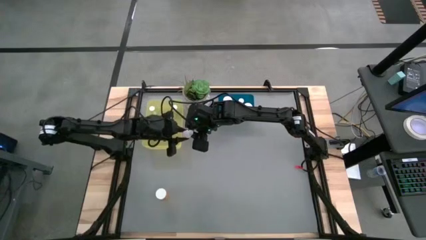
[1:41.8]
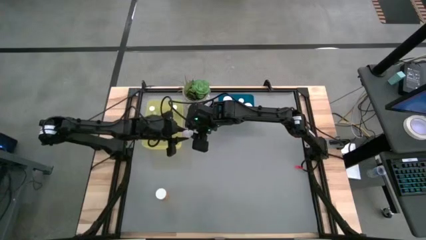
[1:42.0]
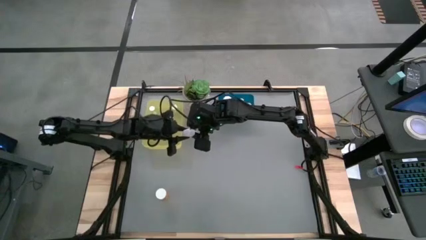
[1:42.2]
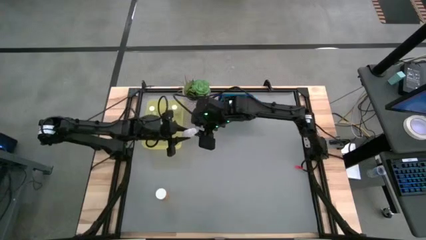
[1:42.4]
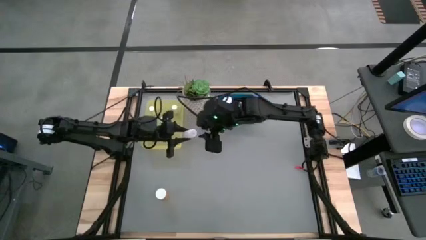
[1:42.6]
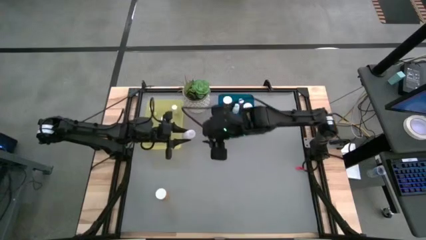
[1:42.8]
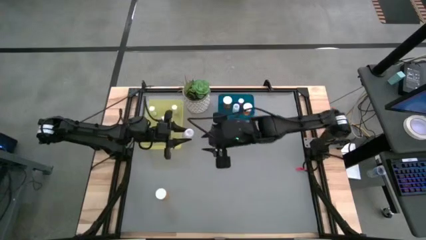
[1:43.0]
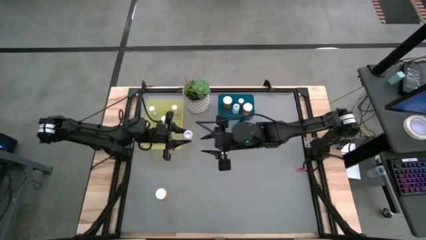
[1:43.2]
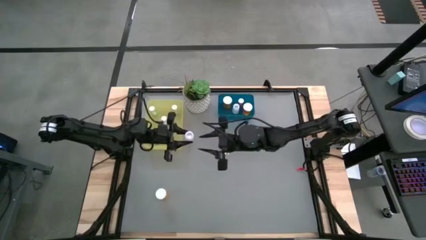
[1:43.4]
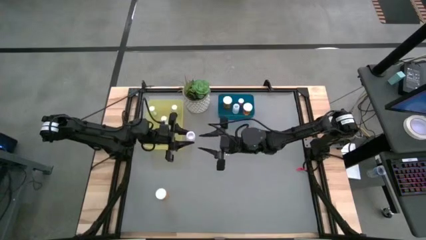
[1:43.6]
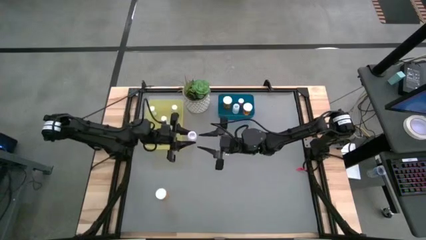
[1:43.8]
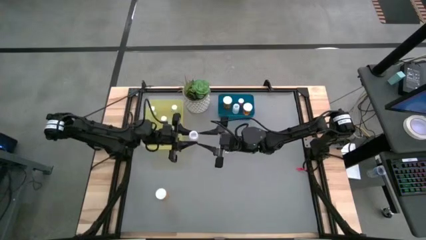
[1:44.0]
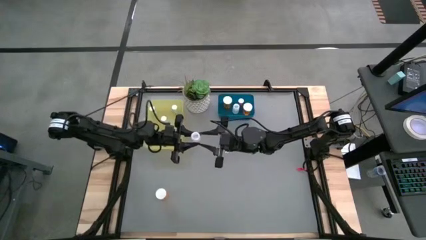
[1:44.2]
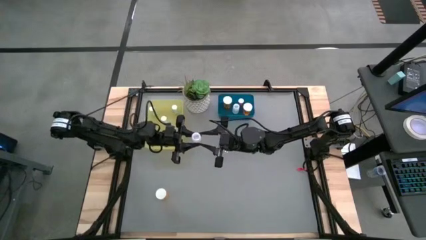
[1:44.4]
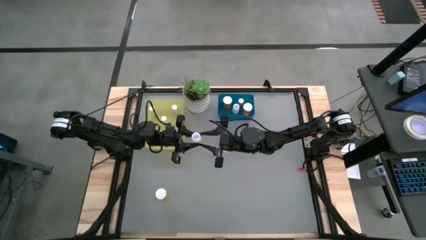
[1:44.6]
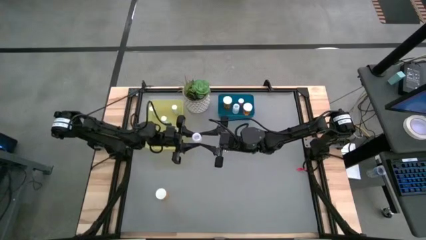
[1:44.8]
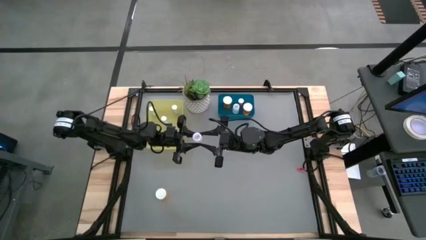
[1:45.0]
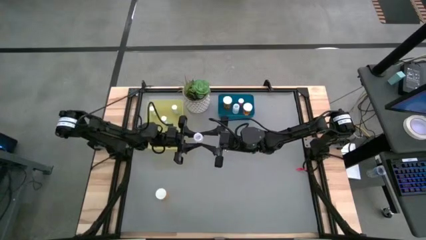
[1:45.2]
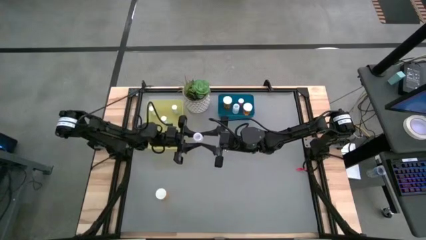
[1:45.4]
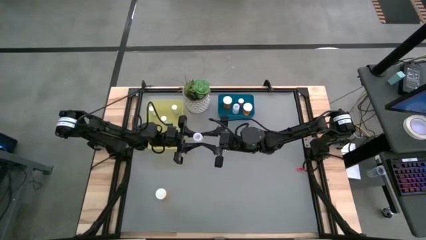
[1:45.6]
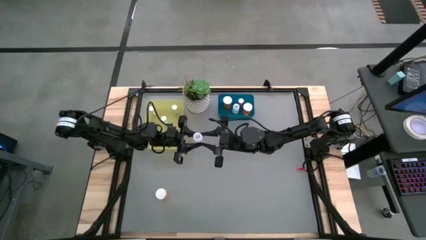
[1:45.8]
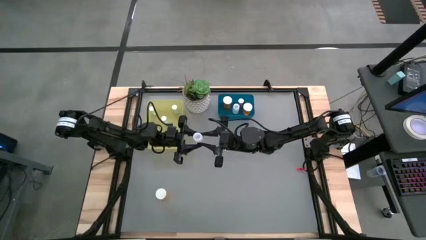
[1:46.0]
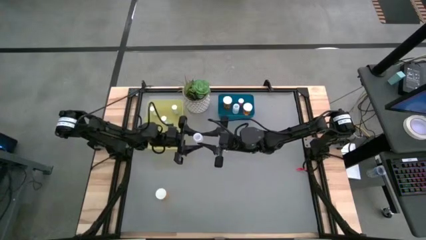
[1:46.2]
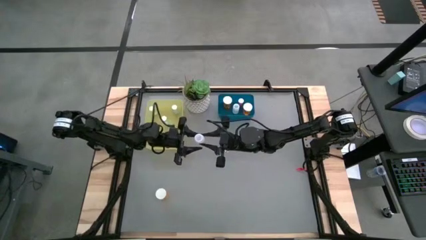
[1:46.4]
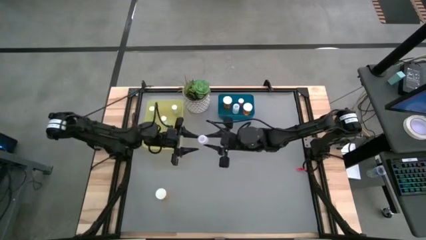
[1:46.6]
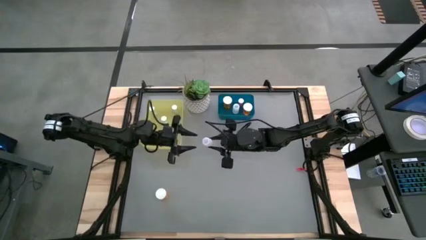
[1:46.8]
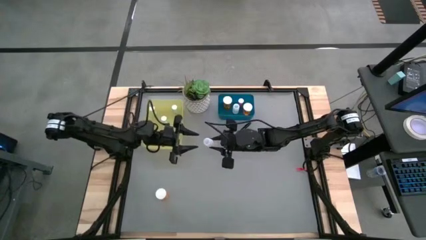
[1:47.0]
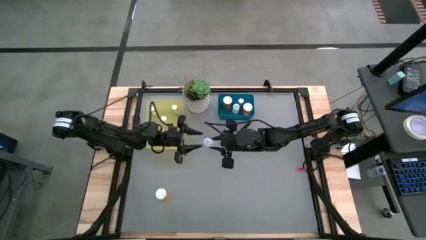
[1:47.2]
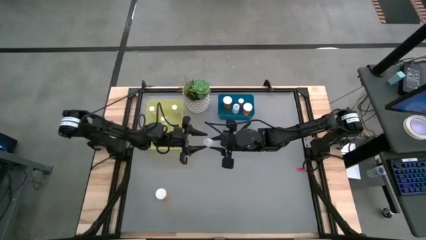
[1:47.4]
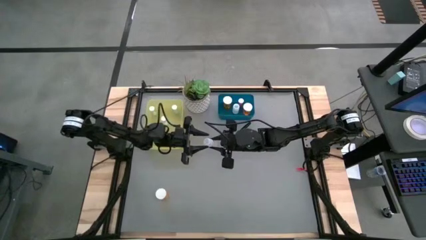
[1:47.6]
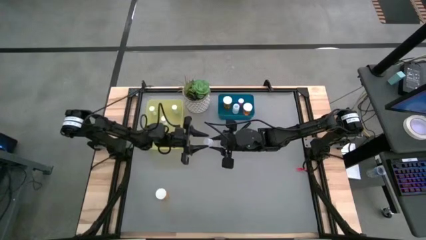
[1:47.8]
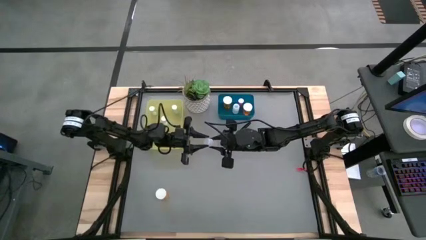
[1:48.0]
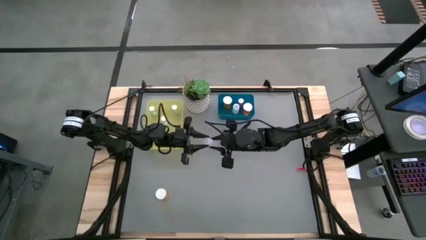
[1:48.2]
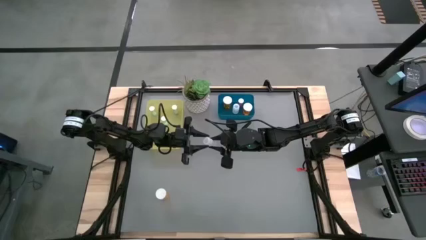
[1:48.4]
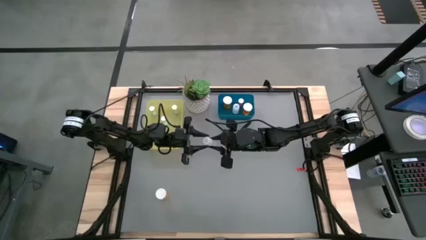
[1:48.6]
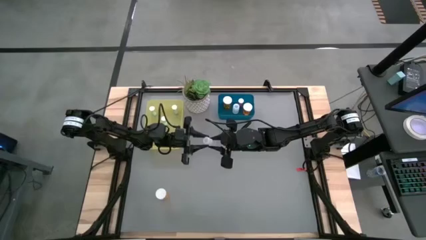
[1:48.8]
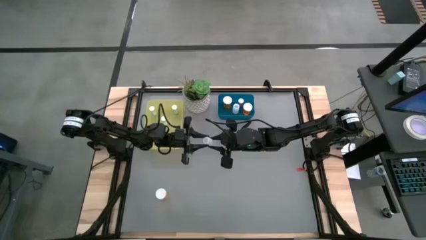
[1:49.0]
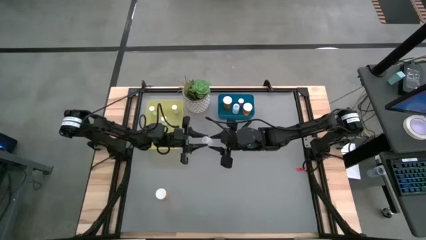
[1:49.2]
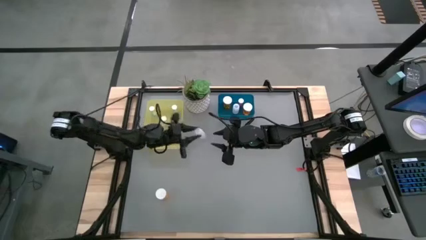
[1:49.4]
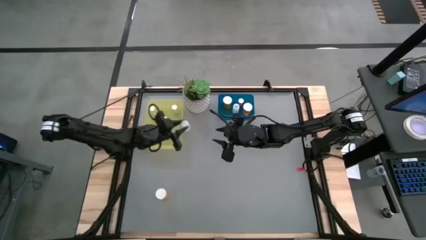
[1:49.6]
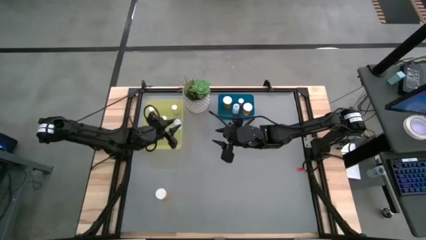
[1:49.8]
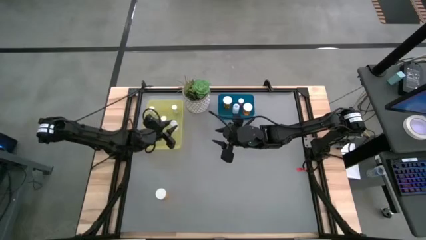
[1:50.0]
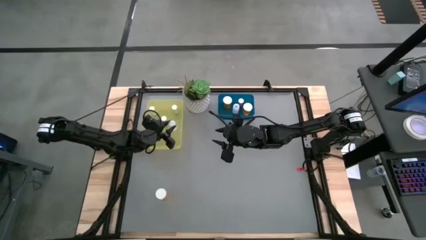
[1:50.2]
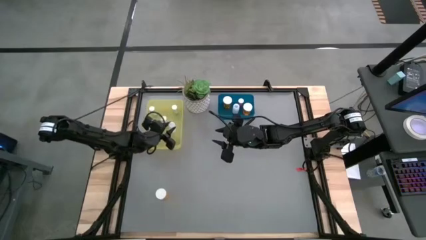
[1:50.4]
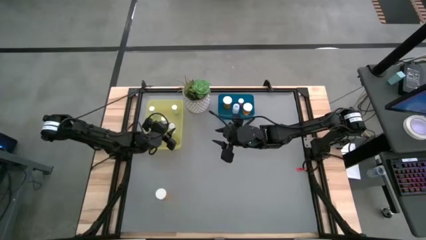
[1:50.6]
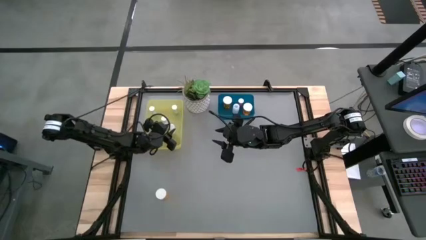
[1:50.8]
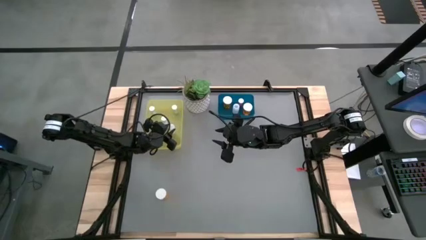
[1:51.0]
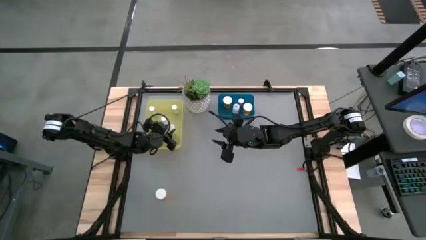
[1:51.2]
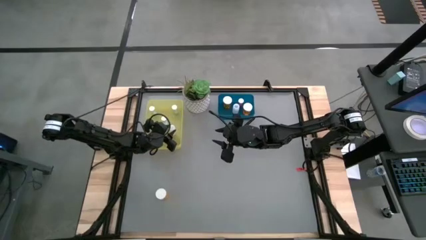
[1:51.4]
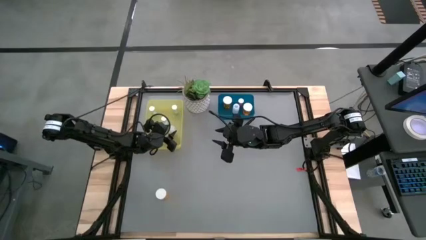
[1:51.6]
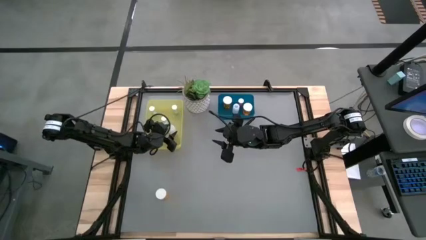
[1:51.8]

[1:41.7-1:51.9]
Task: Pick and place medicine bottles into bin by pill shape (circle, oval)
Put the white tablet bottle into the yellow bin

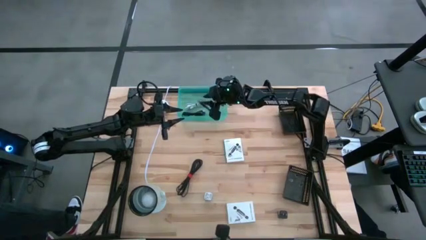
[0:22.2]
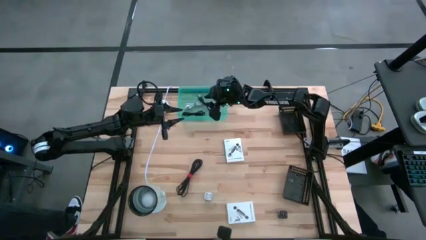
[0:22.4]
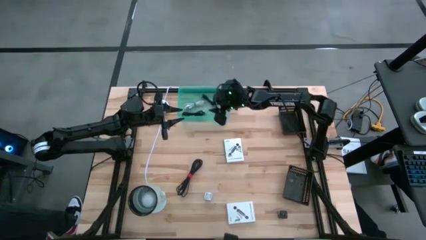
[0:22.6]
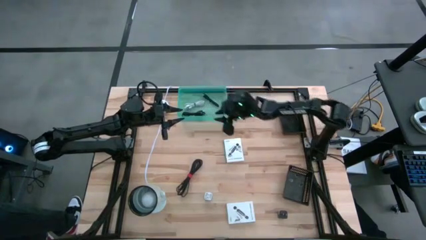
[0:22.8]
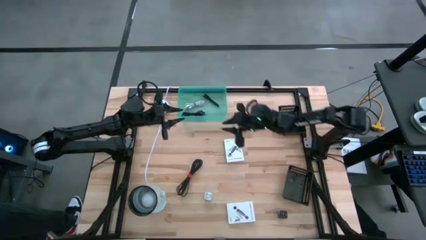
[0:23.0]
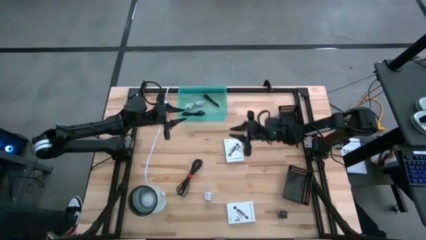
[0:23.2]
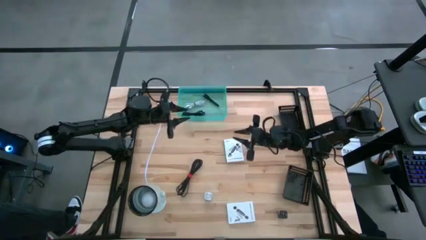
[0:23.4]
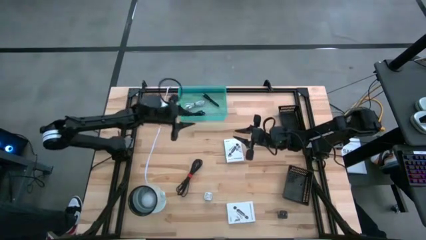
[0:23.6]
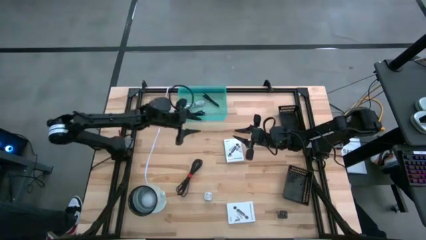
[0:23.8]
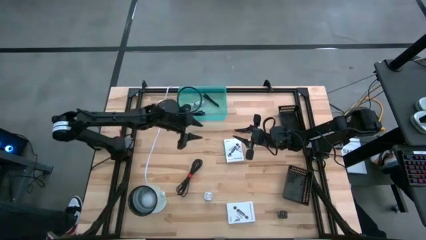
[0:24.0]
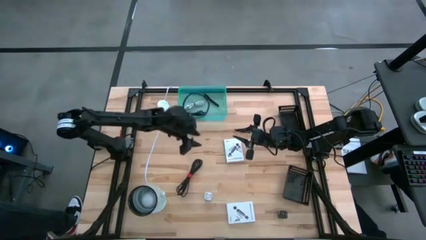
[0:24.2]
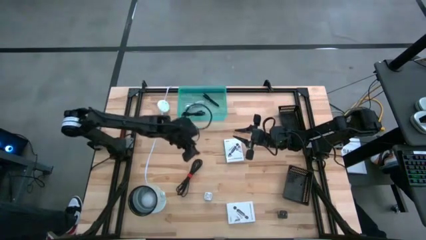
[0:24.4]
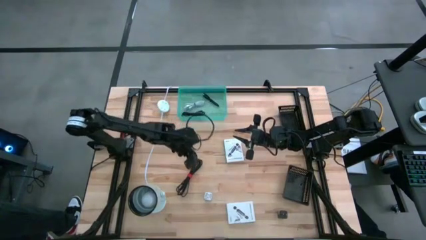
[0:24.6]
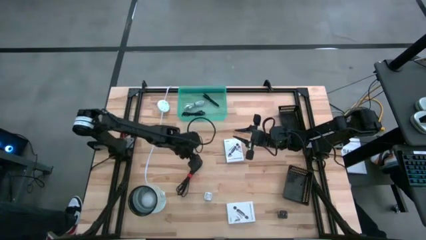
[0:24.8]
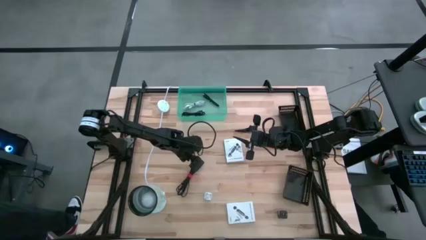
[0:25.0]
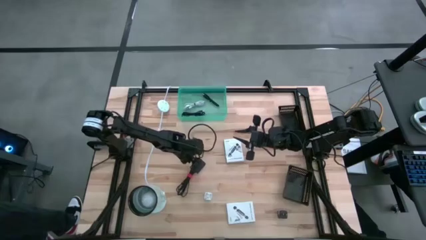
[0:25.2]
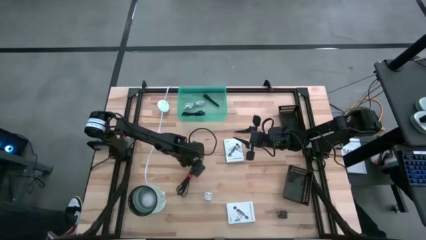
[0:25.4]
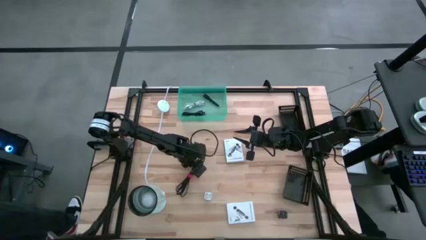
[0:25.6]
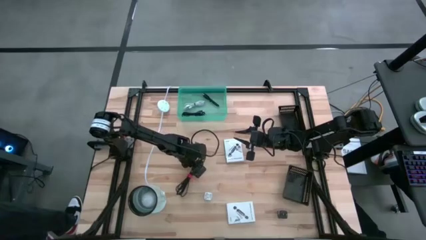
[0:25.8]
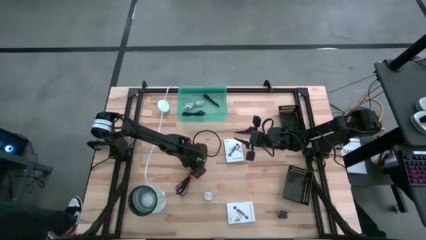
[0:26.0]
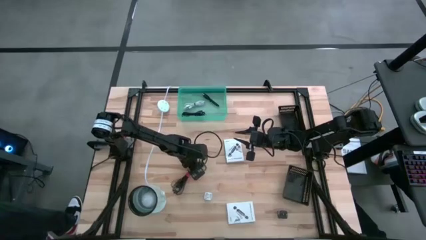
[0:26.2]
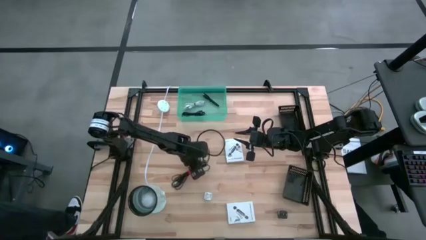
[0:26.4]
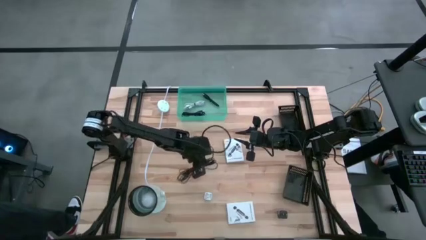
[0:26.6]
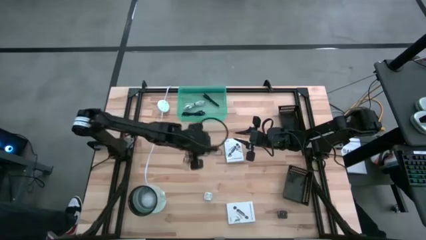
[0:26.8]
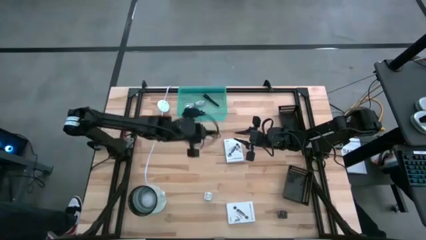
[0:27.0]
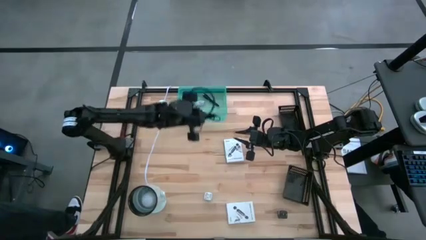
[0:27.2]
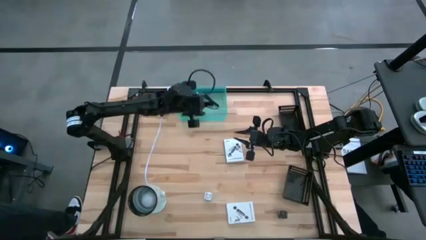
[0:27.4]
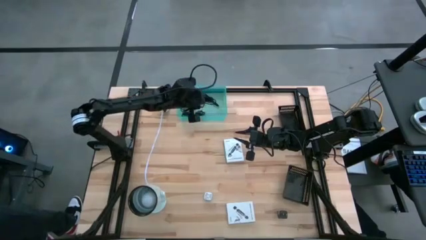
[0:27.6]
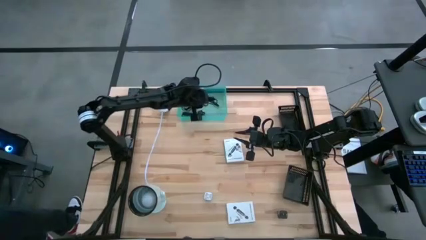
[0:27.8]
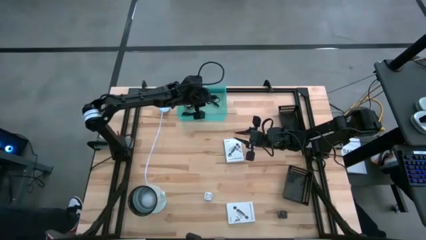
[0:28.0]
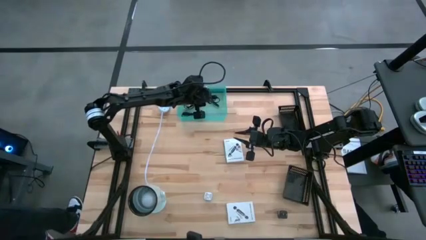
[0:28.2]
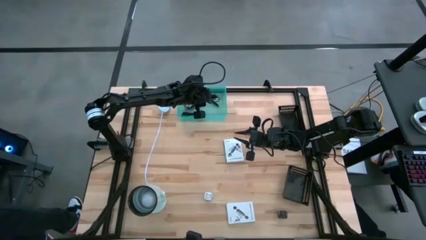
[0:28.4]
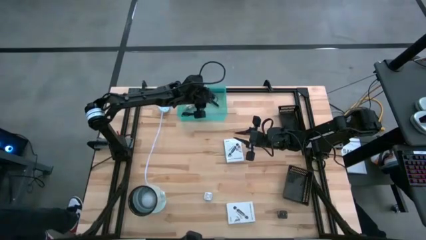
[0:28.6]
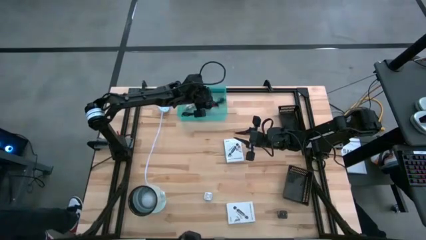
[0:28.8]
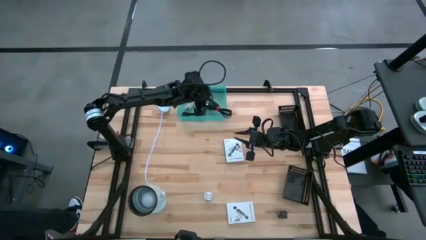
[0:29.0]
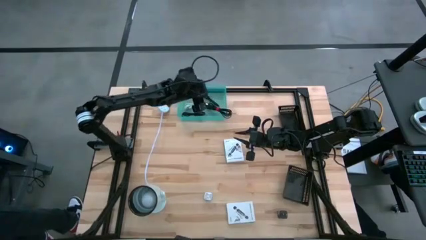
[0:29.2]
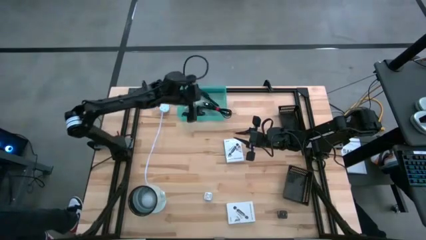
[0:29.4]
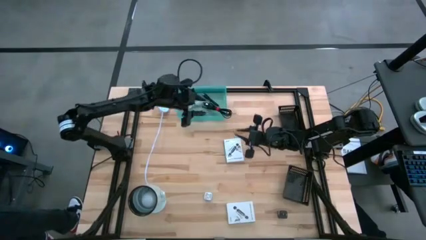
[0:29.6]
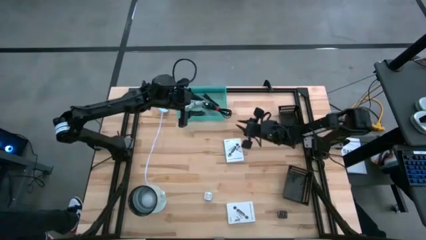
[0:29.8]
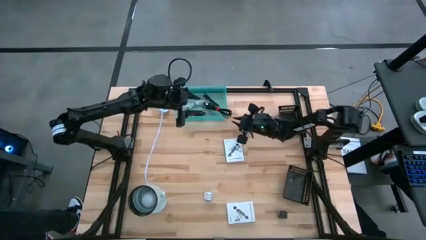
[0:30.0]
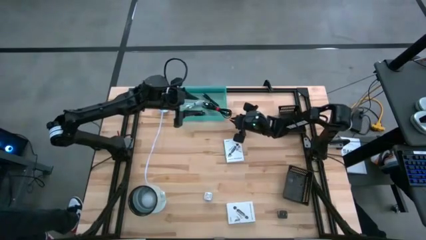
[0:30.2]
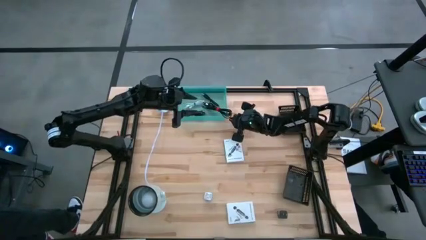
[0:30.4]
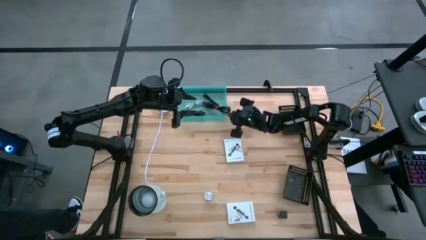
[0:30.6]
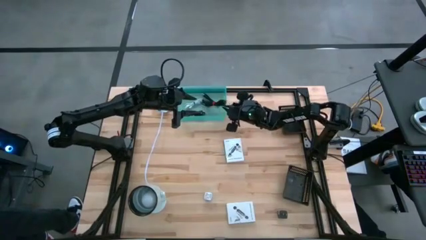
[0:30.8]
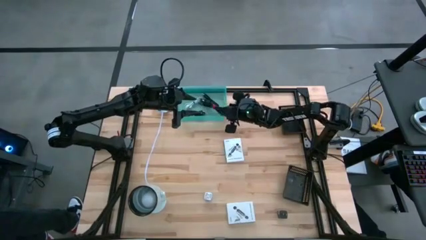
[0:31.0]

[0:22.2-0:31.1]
Task: Pick and place items into bin
Put the black charger cable into the blue bin
